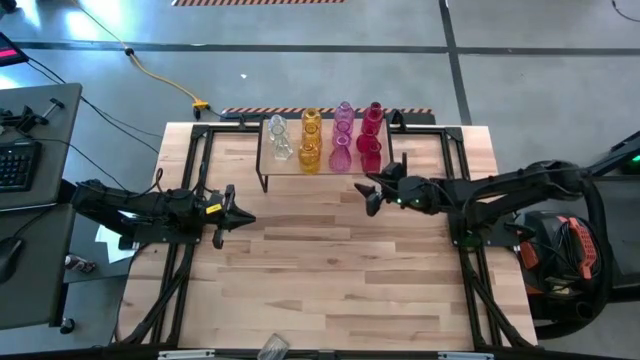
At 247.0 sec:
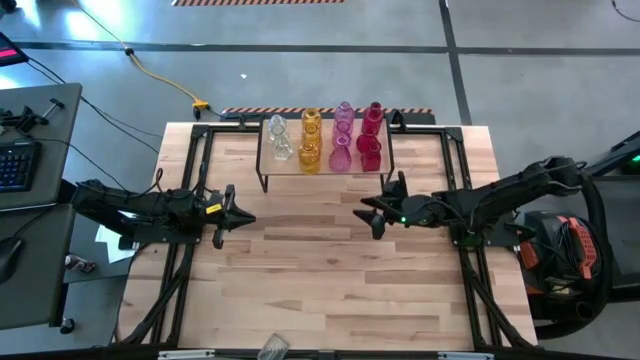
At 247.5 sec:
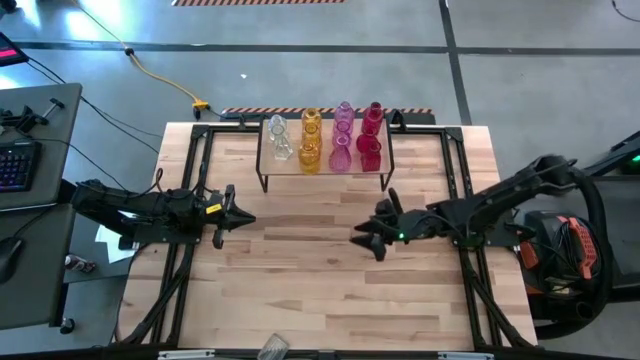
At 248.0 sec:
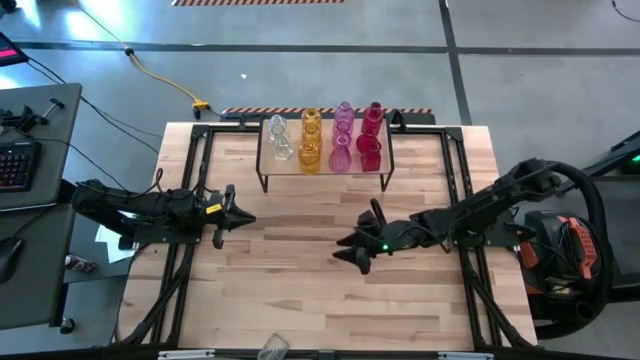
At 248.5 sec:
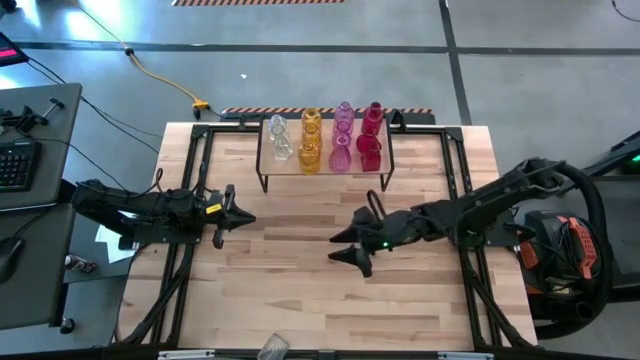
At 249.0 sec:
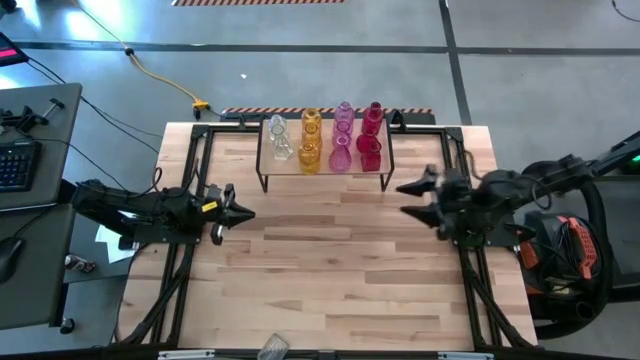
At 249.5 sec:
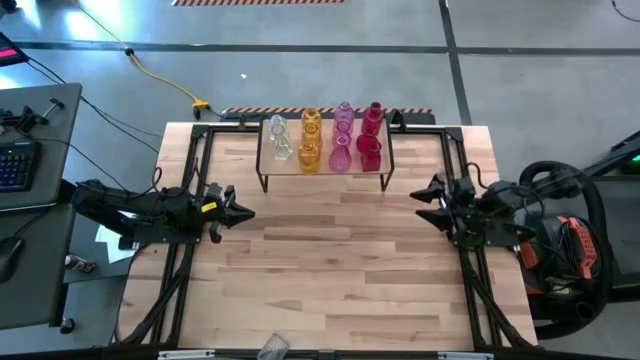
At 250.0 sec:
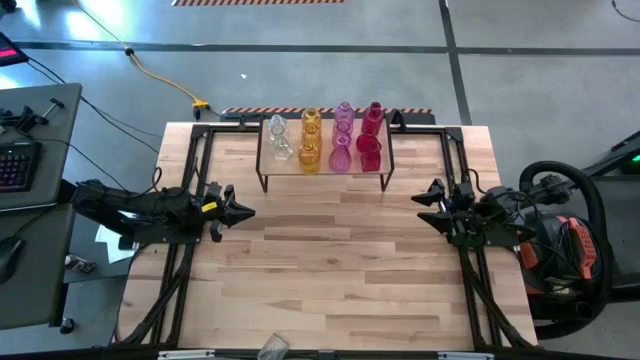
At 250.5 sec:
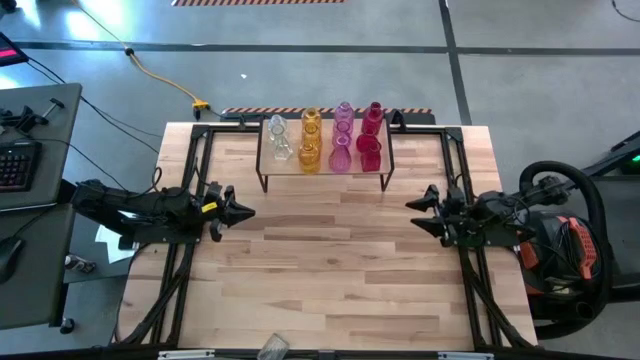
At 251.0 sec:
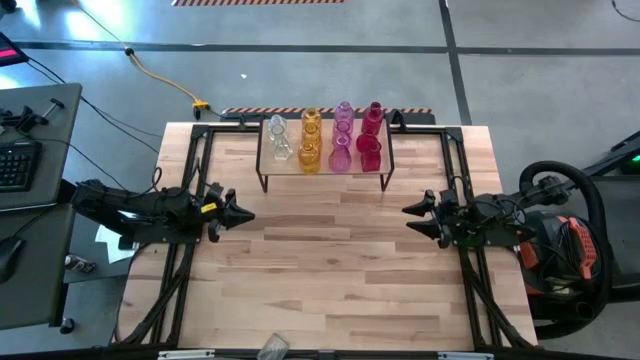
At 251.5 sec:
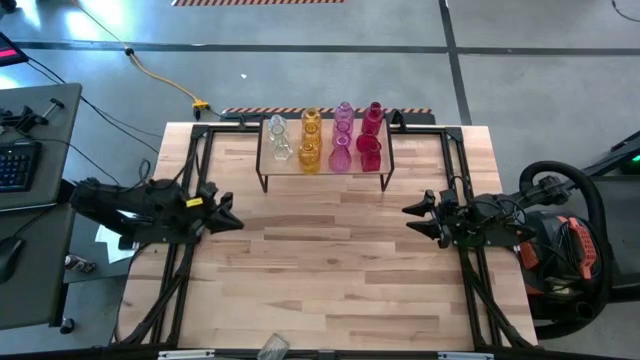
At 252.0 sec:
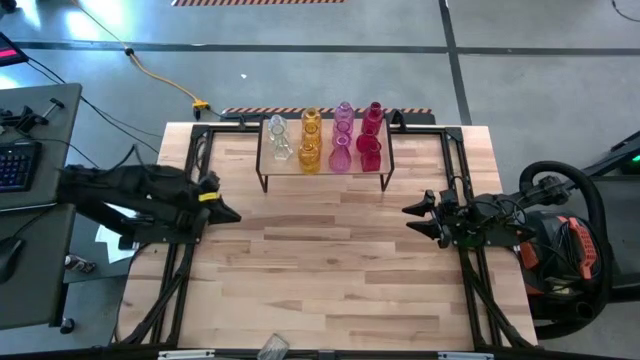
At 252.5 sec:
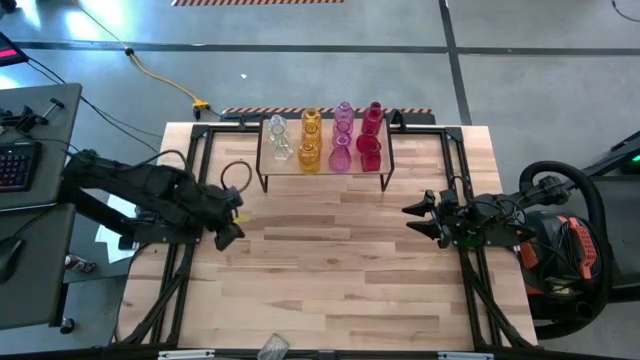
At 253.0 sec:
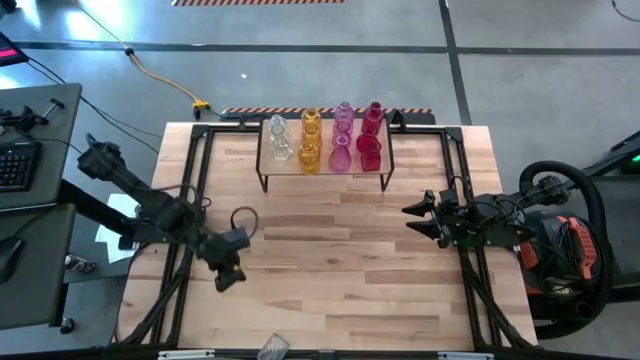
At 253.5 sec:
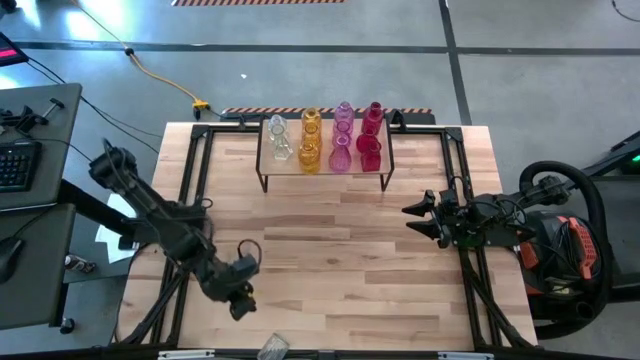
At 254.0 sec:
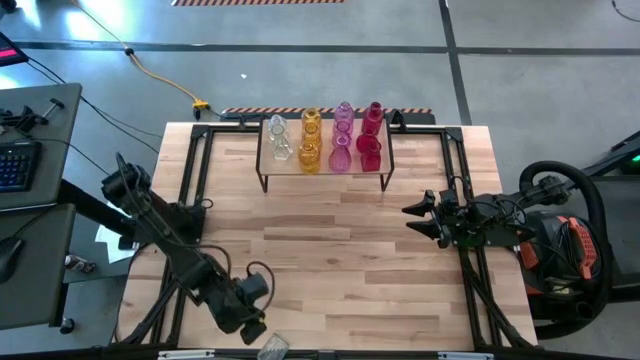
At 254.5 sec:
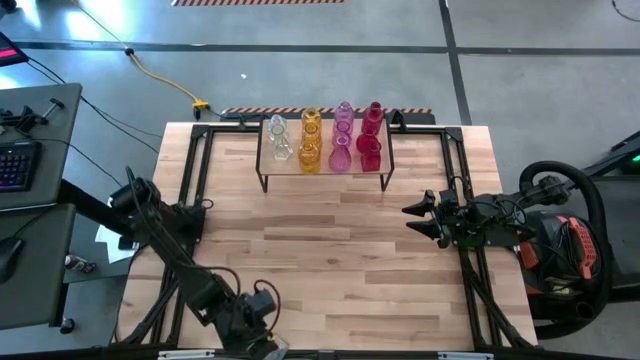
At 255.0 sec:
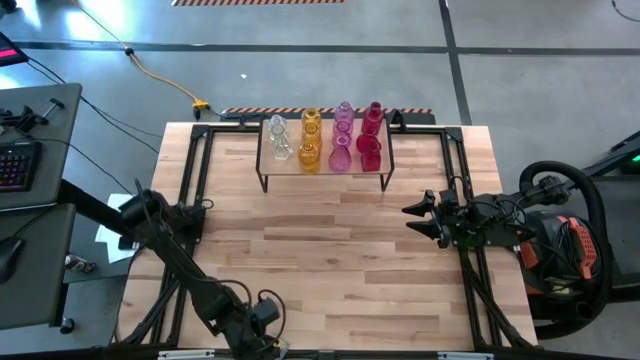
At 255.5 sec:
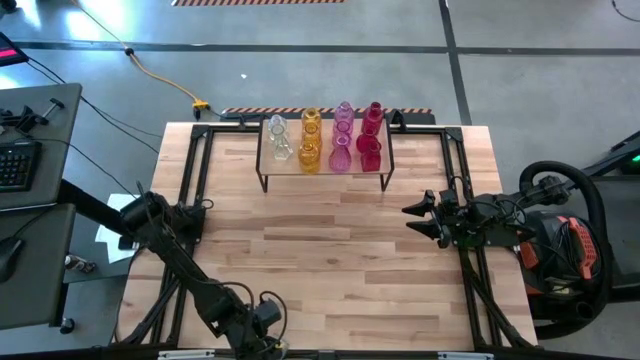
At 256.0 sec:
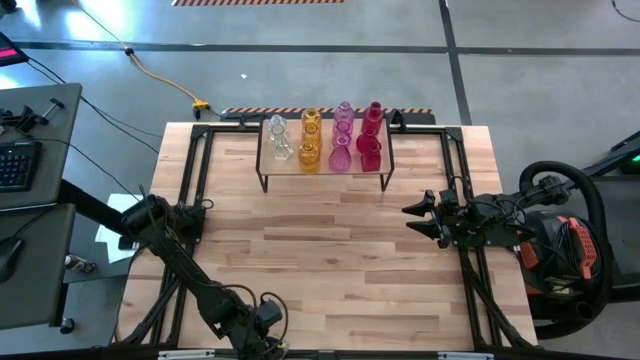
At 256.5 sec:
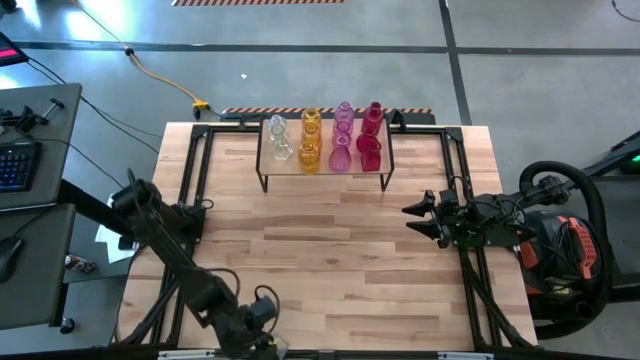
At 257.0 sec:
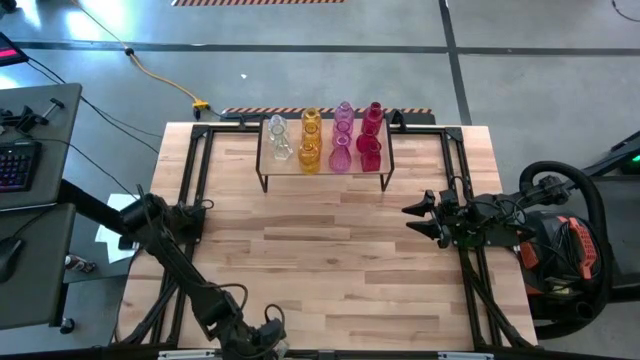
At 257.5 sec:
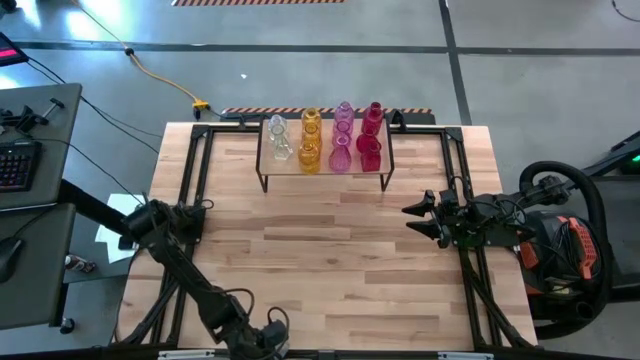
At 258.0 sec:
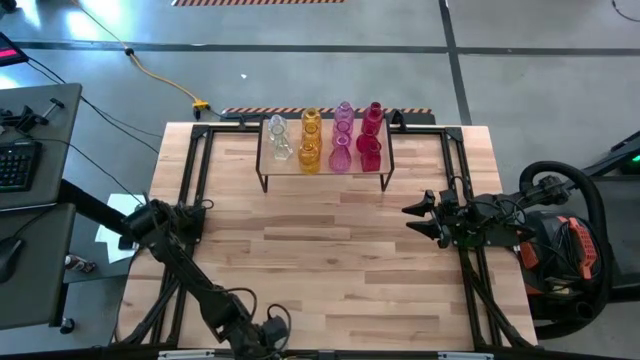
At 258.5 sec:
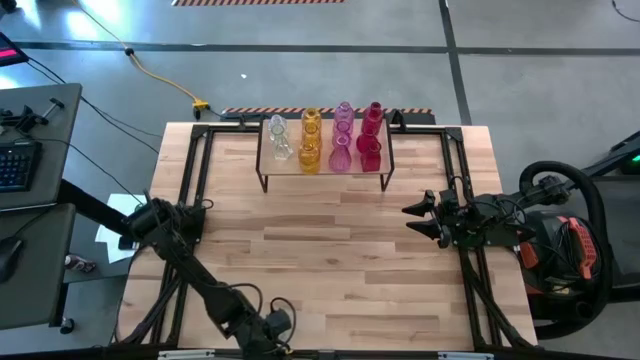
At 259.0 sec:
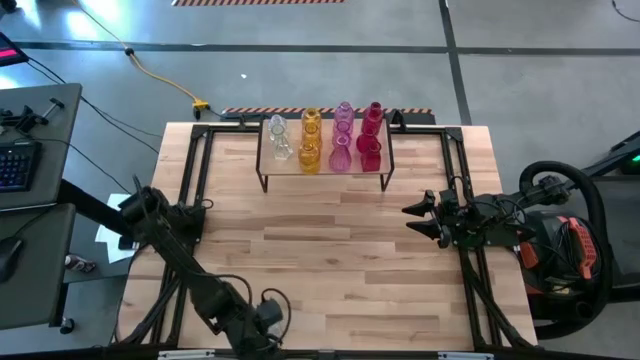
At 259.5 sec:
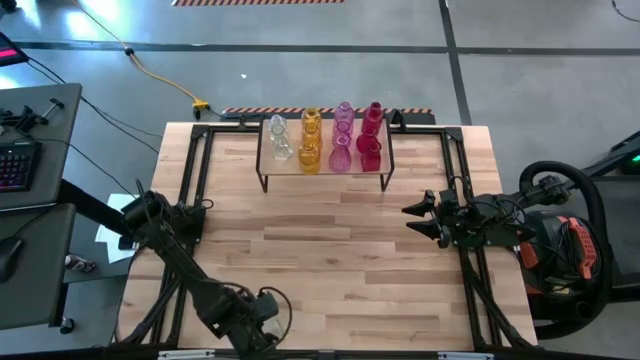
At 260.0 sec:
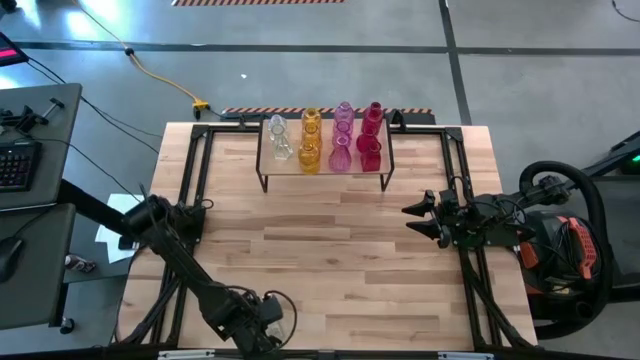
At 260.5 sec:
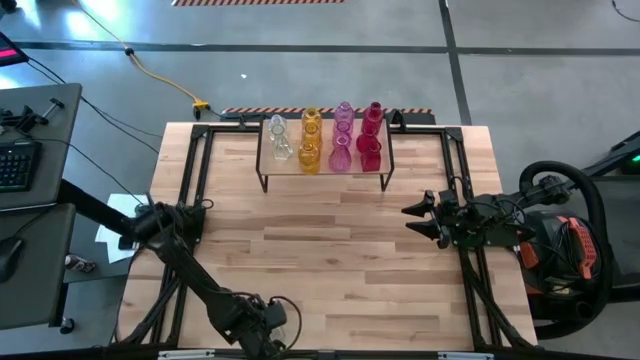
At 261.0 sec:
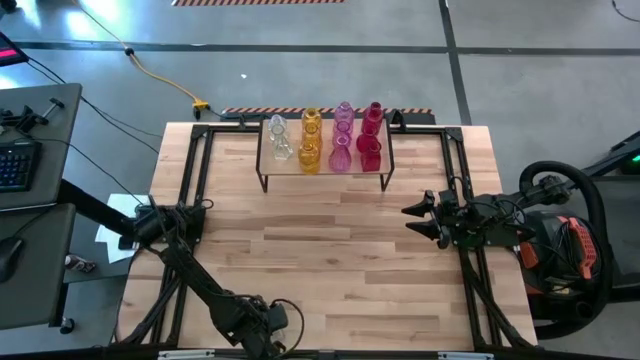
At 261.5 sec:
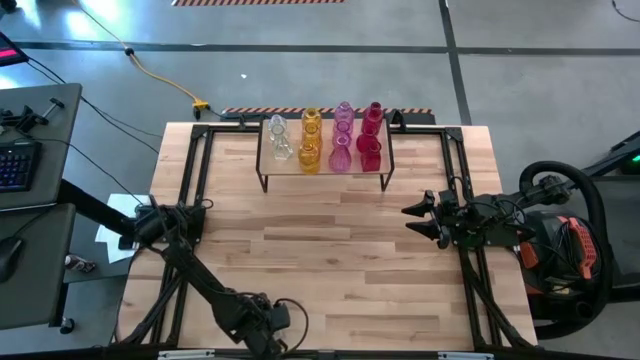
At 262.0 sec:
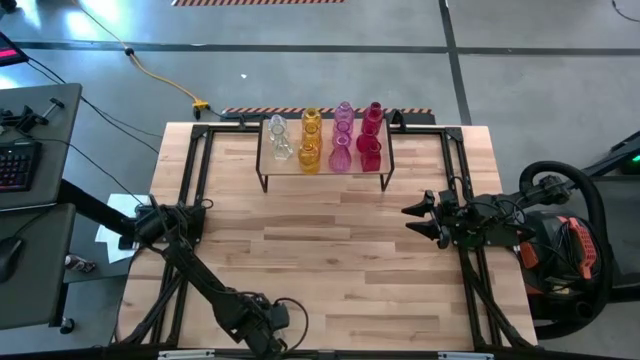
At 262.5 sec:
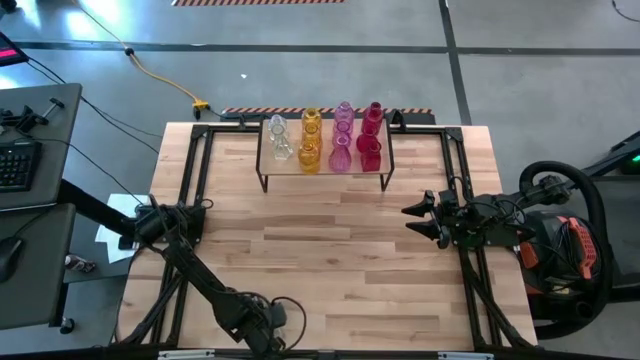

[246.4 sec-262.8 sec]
Task: sort vases onto shelf
Put the transparent vase aligned with the other transparent vases on the shelf

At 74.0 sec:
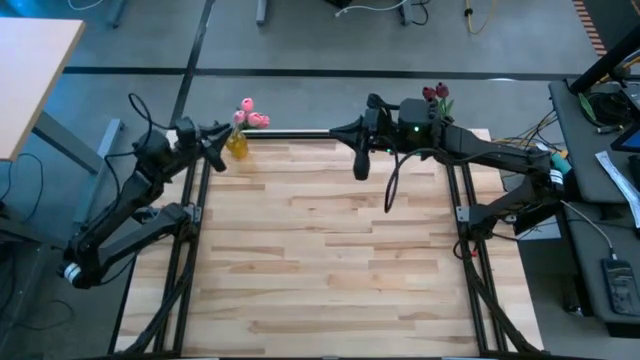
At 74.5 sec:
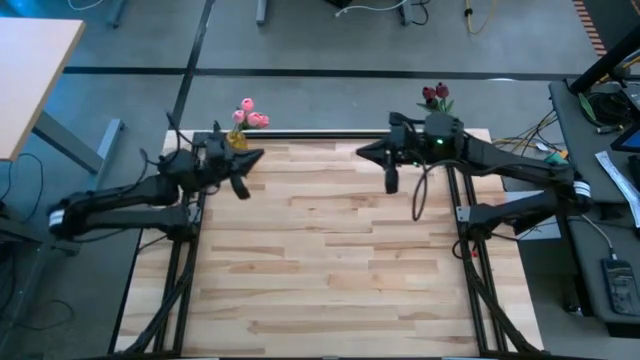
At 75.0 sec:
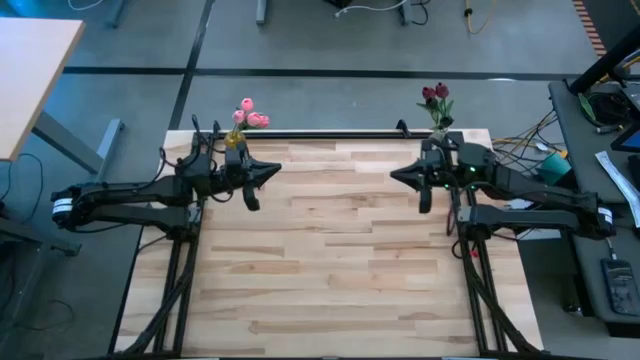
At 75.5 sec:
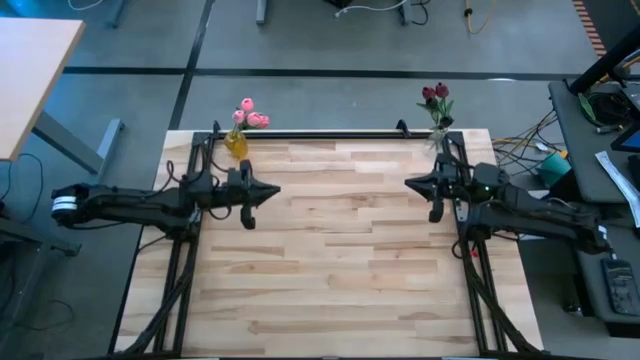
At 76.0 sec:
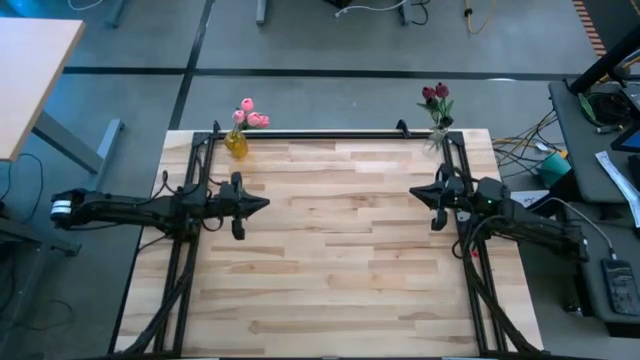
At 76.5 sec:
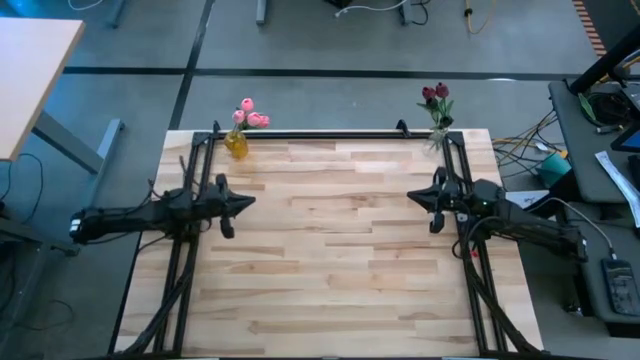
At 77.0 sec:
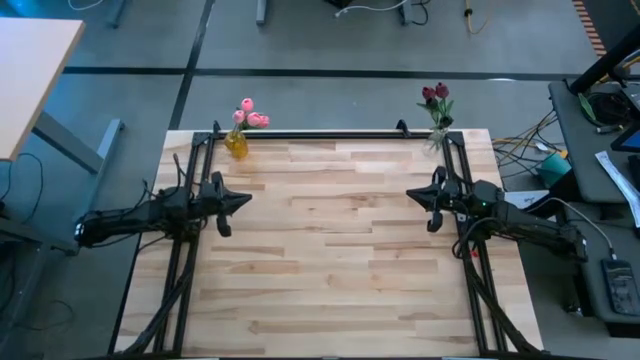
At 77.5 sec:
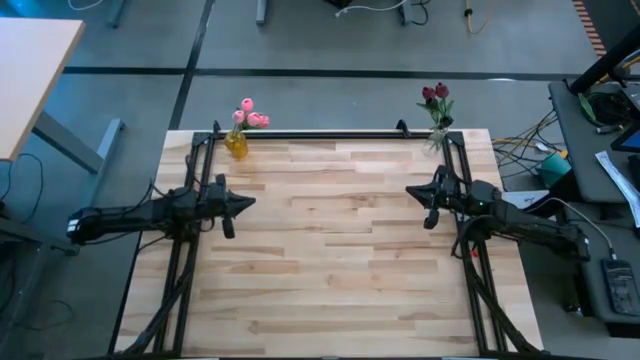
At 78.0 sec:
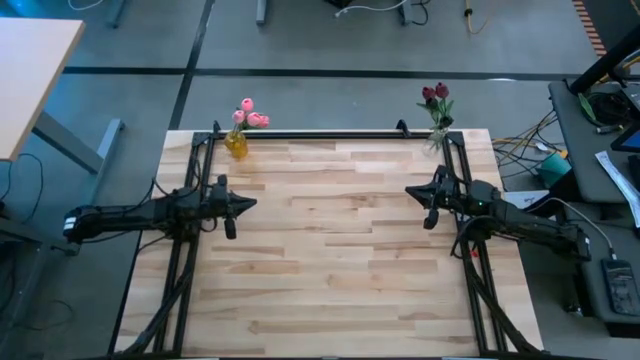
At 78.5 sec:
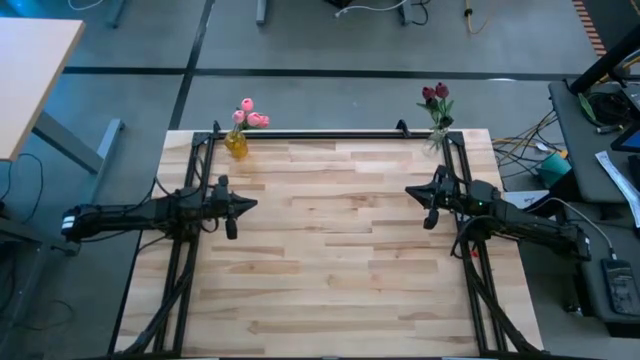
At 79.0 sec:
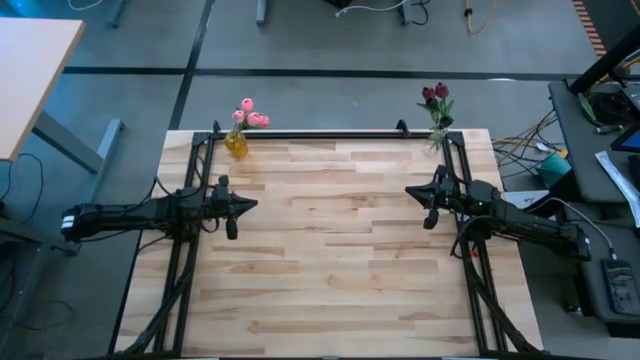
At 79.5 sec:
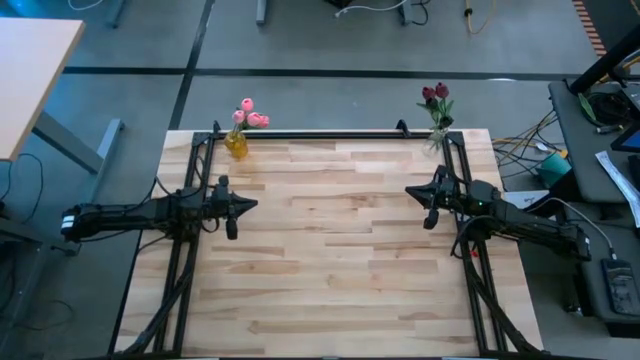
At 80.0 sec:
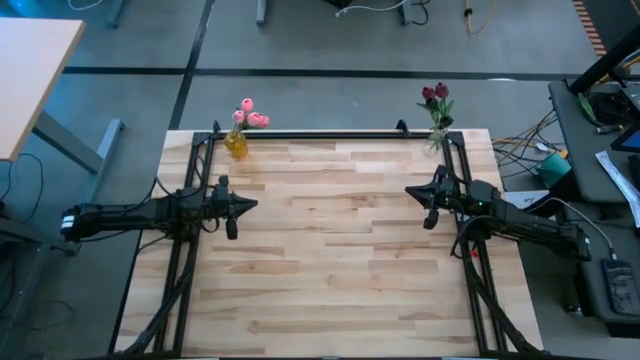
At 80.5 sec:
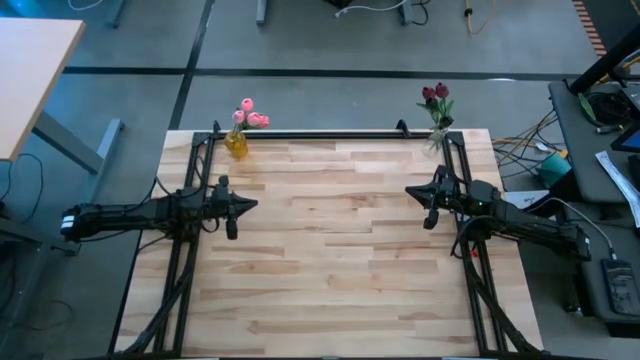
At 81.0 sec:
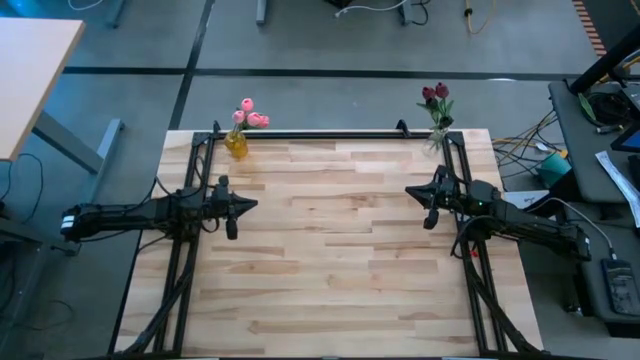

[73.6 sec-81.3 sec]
Task: Sort flowers into vase by color
Return to Home Position
